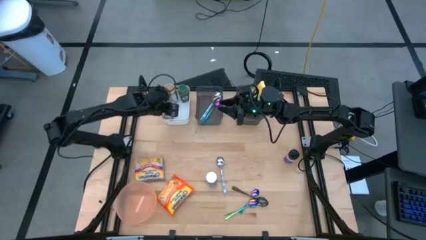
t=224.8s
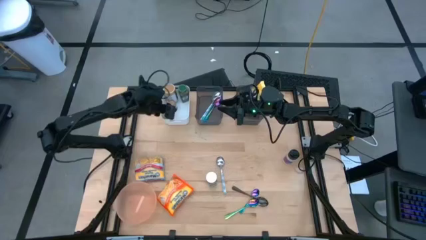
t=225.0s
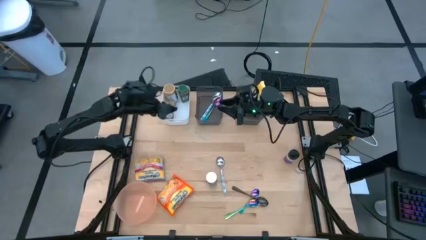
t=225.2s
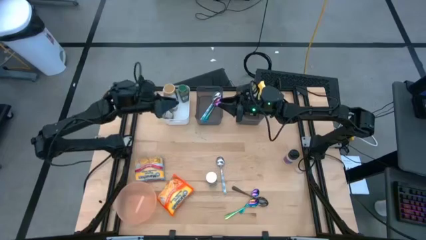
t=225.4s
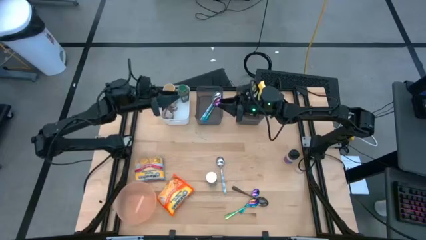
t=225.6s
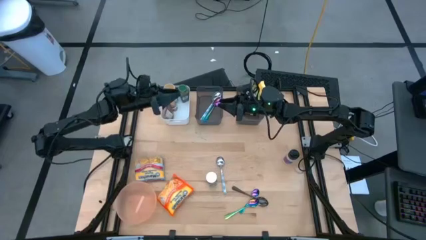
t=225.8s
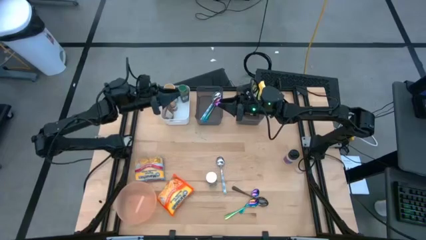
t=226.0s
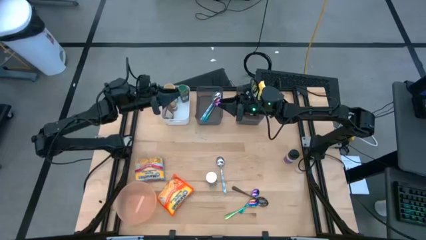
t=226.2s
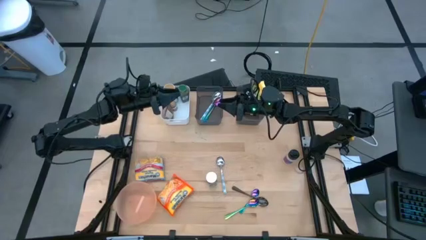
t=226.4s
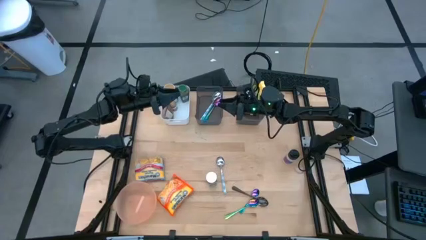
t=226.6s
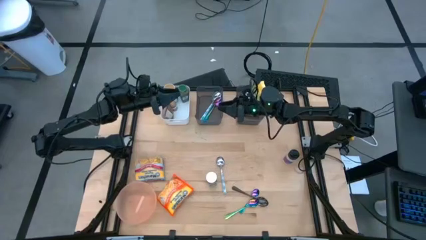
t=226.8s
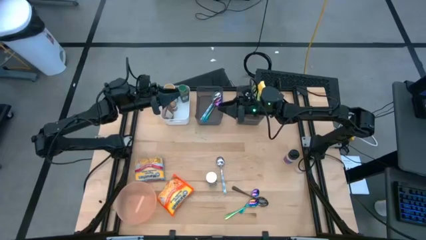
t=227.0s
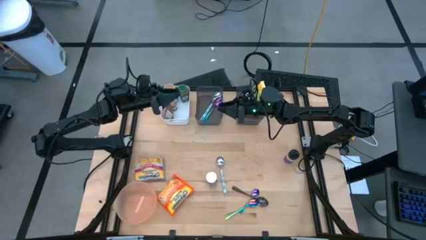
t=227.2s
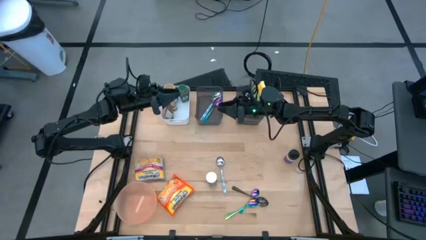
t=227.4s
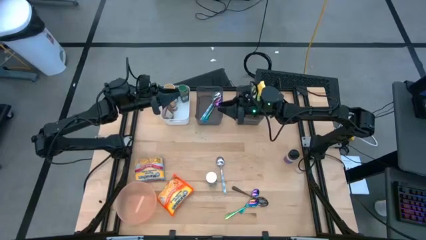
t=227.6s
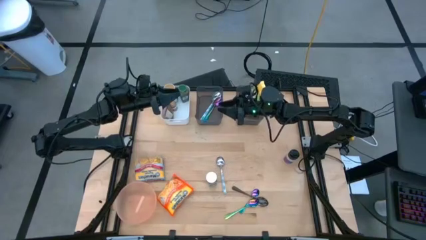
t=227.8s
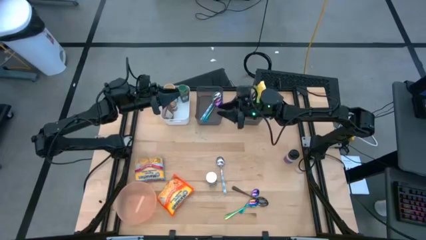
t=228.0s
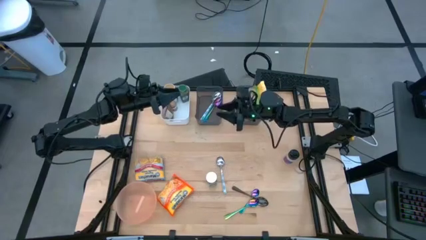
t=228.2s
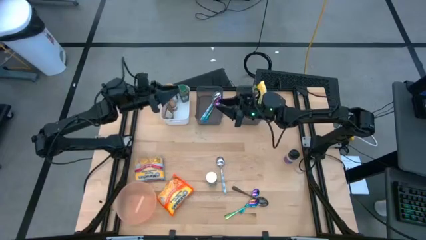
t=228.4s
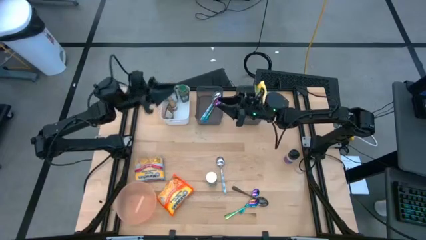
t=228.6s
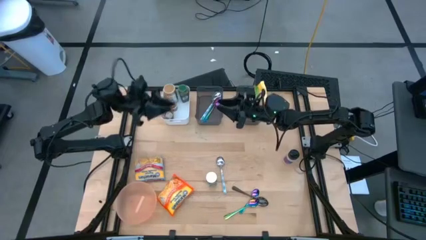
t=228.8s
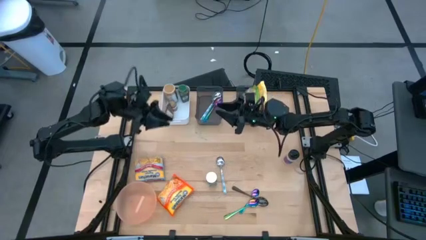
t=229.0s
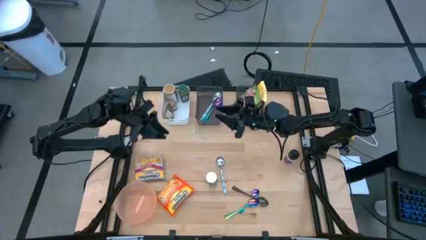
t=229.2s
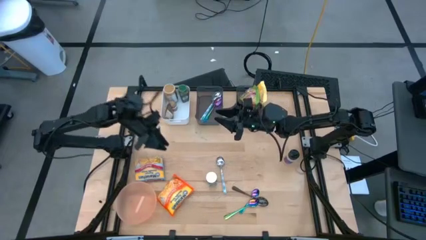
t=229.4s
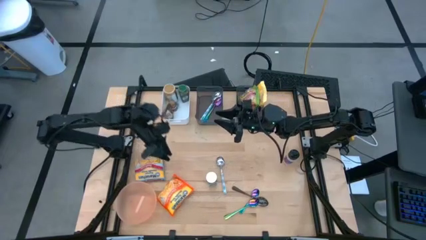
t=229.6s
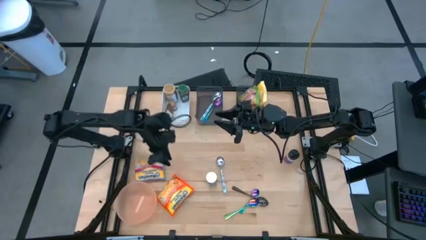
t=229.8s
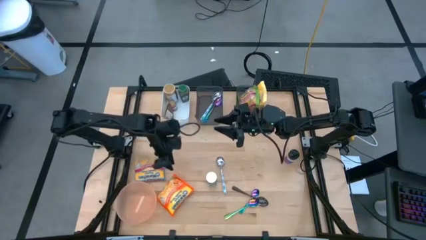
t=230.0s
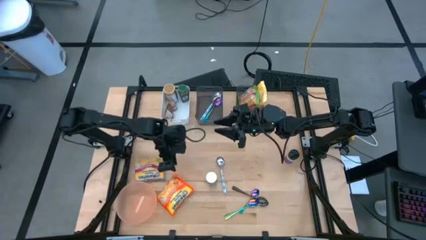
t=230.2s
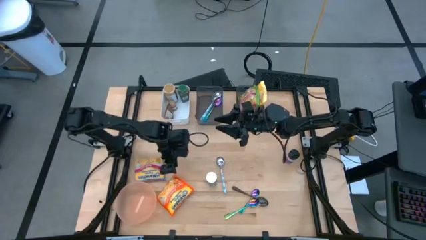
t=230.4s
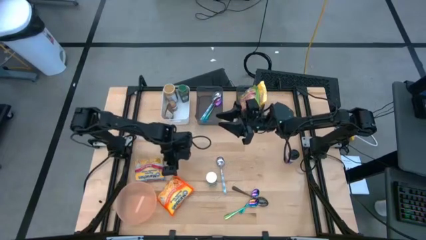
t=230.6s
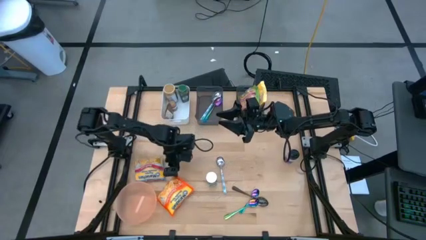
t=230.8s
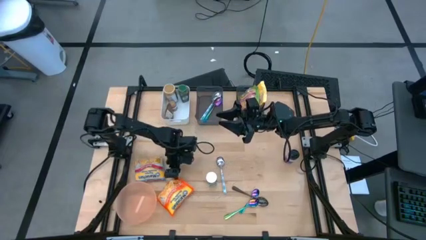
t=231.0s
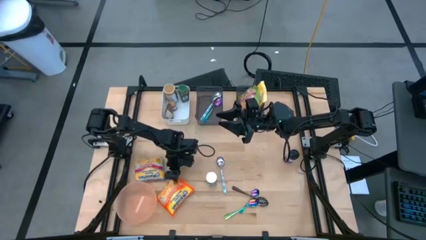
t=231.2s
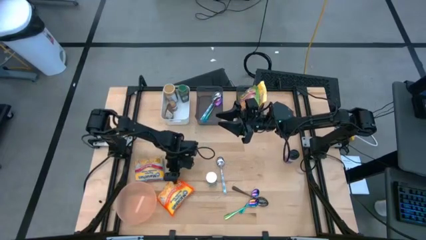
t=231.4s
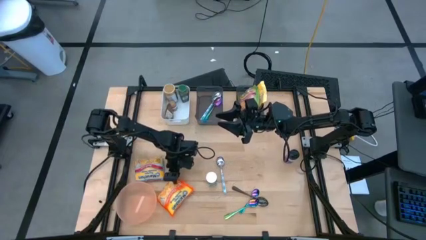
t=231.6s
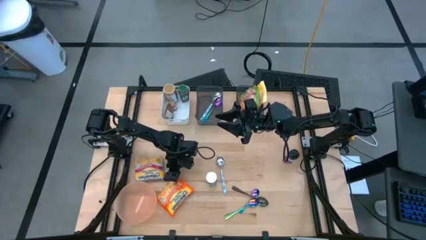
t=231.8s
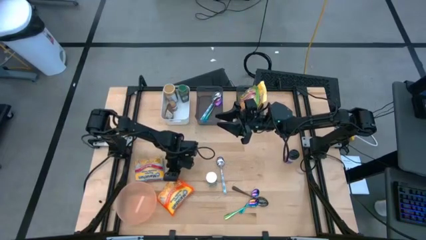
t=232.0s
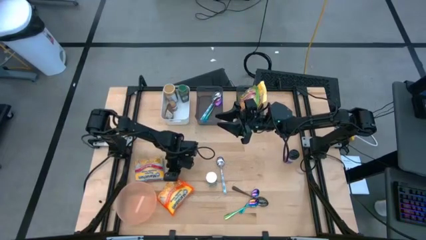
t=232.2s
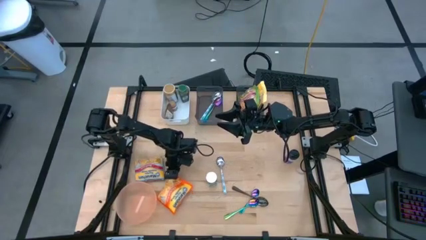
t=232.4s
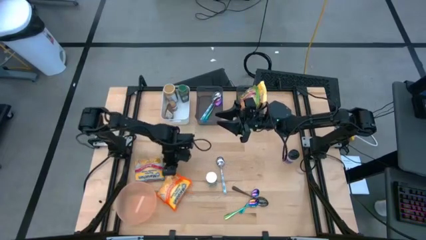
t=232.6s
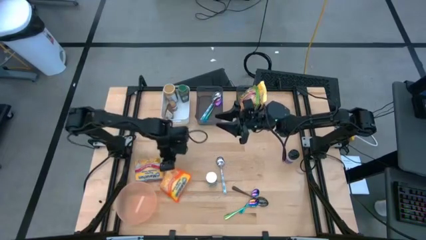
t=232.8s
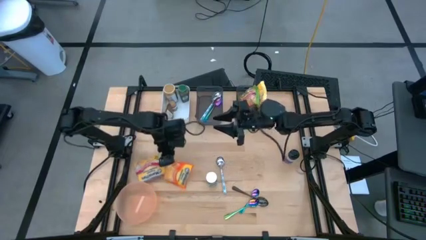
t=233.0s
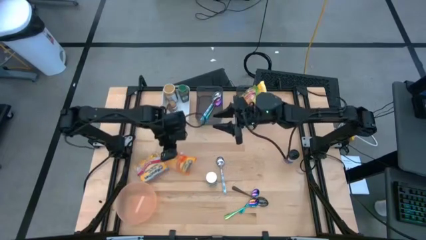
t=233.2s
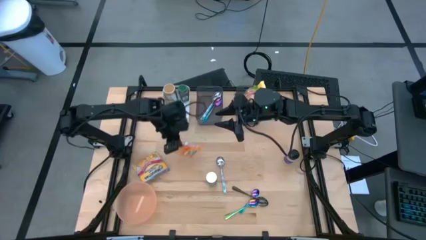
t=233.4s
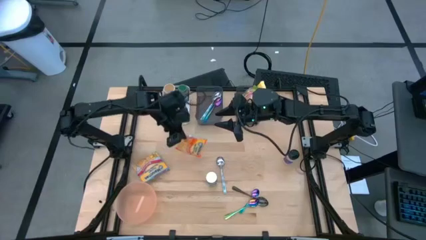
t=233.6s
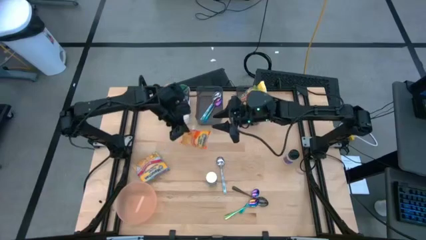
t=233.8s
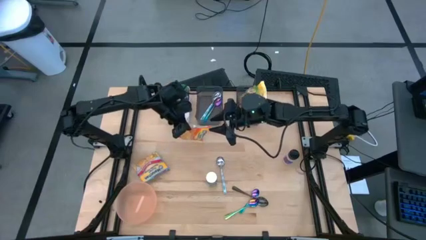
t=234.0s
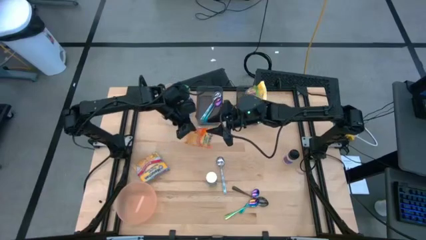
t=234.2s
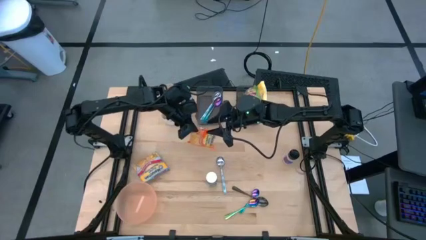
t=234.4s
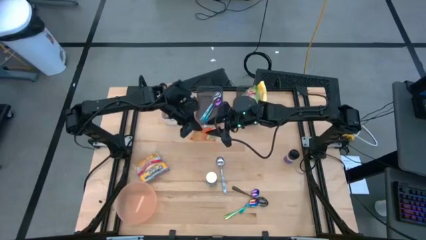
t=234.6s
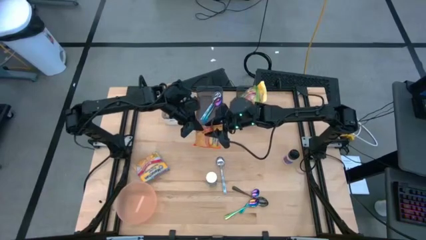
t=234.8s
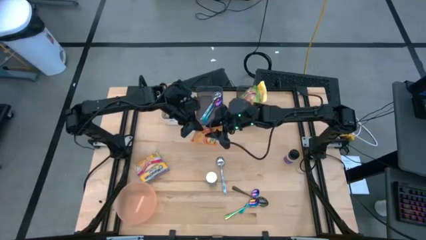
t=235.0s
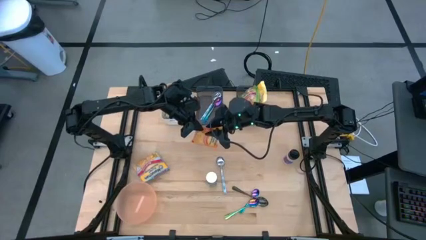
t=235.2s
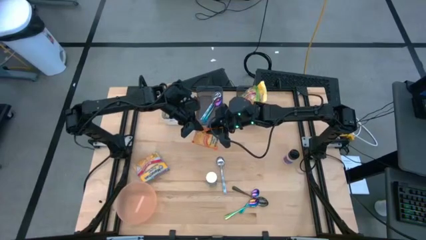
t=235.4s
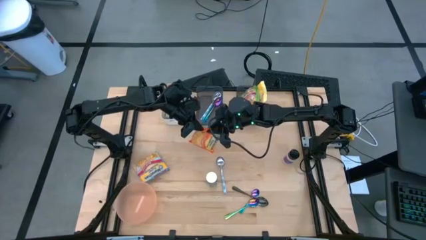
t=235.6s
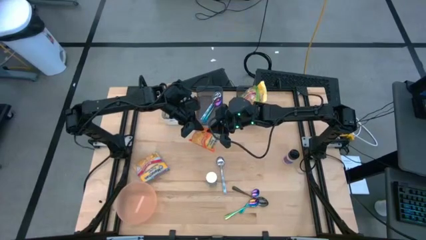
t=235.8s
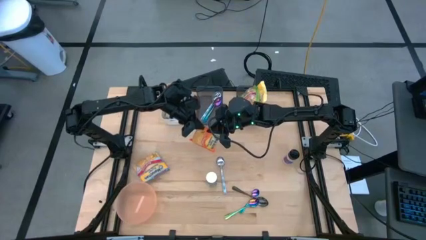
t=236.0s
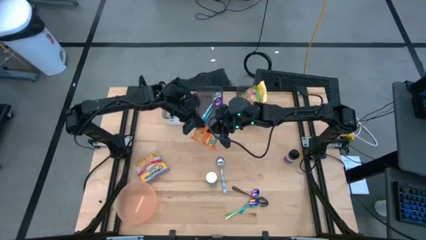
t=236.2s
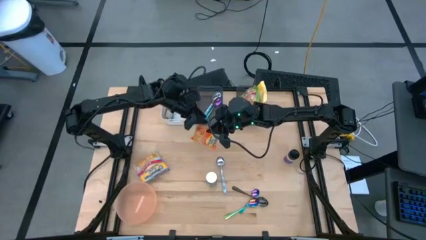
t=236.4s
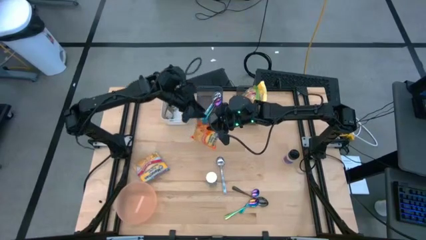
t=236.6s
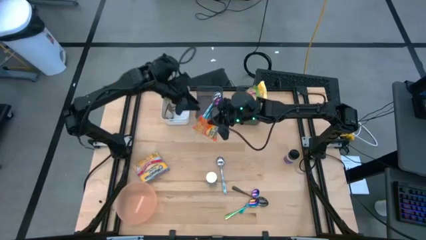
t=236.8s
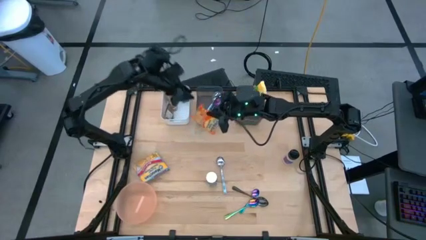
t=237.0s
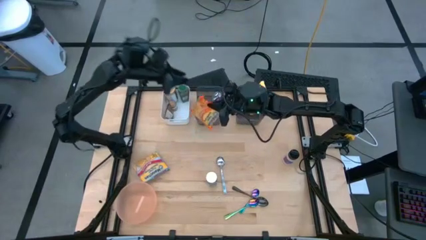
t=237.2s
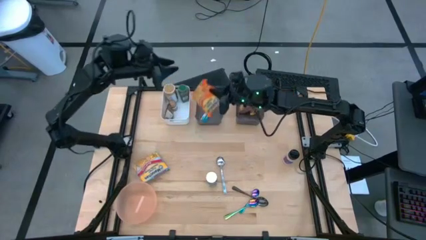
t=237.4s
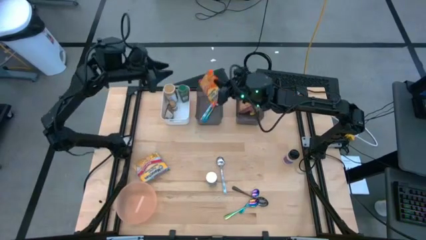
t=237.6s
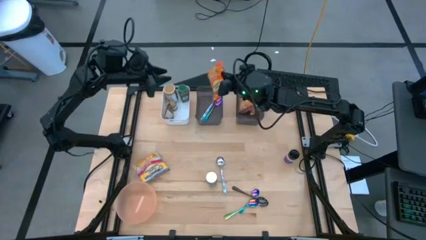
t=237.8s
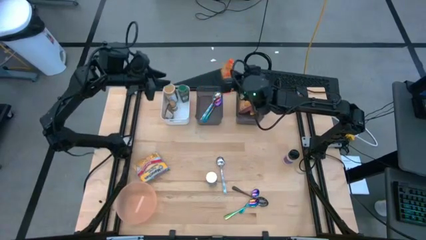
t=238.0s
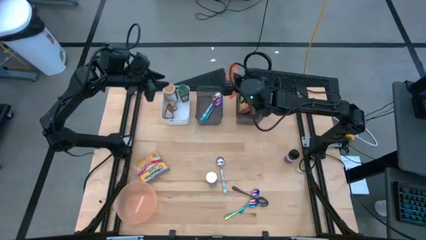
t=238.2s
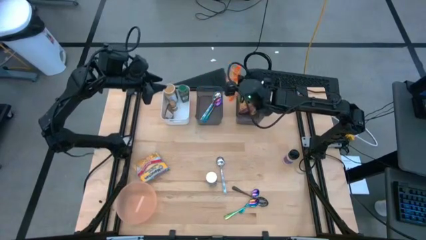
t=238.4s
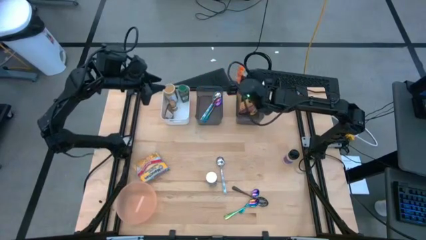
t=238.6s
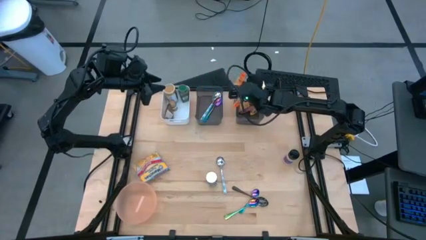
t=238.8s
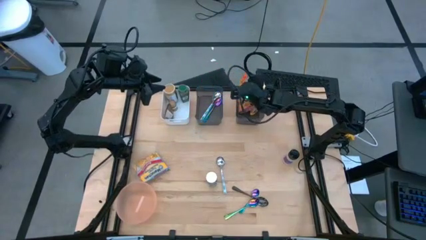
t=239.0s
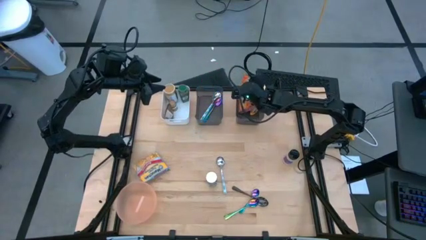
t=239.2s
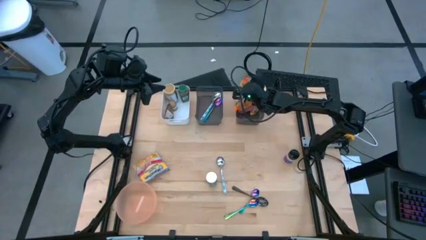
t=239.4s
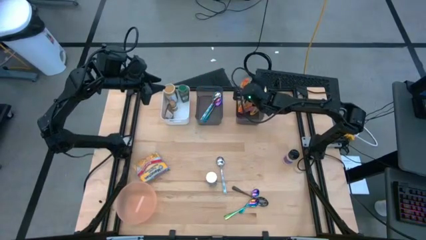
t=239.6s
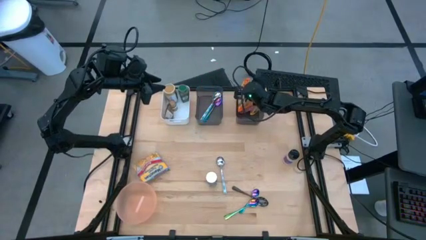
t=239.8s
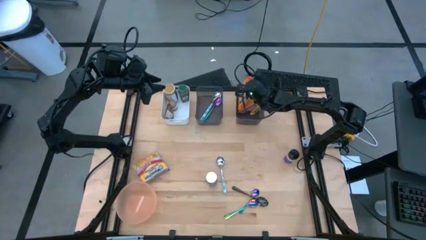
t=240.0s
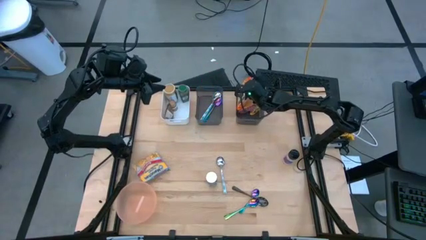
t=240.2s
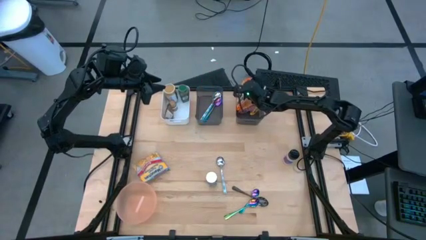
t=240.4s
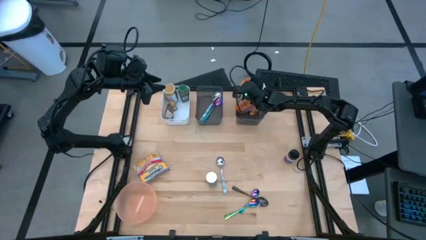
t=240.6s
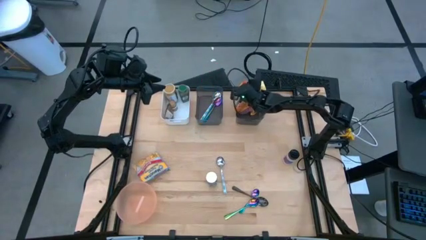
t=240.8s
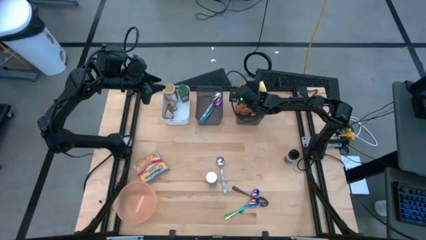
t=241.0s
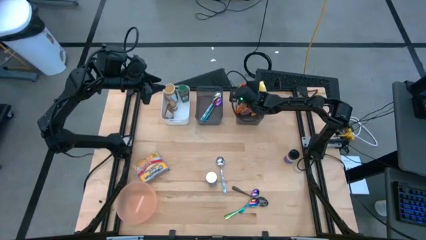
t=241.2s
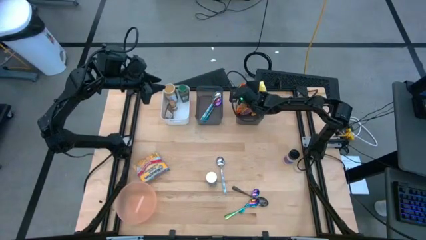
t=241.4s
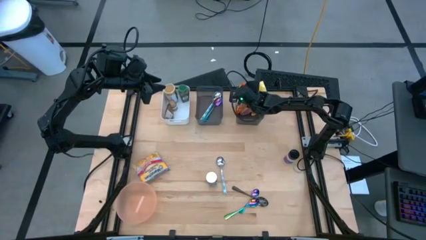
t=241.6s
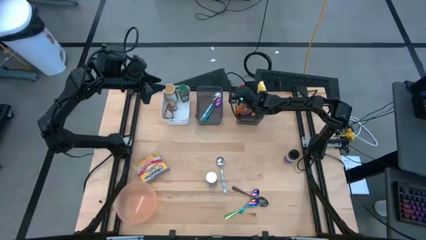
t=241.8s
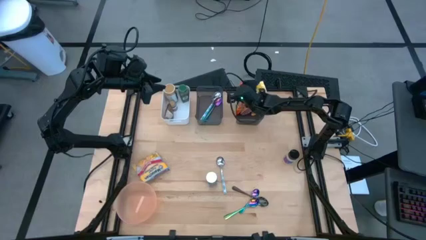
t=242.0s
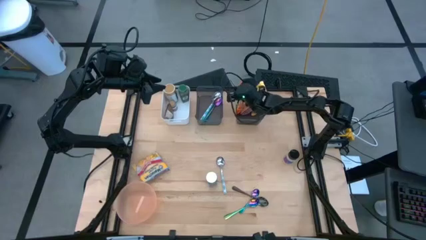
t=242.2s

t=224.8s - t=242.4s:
Task: Pick & Place Food Item
Put the orange noodle pack into the right black bin
